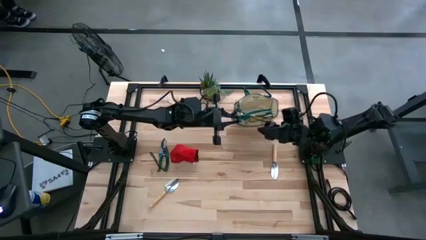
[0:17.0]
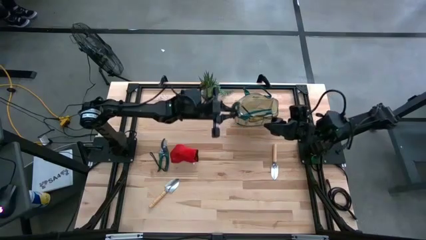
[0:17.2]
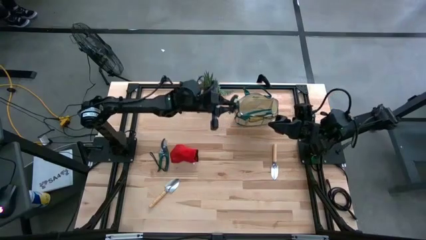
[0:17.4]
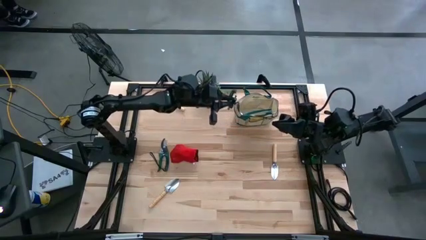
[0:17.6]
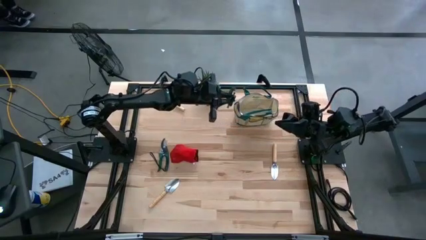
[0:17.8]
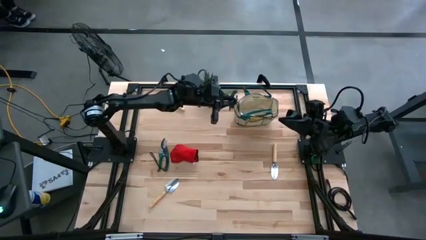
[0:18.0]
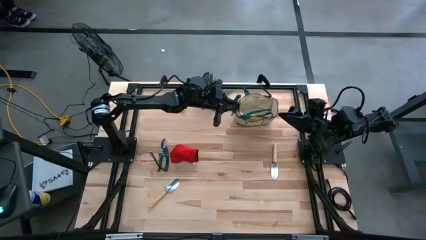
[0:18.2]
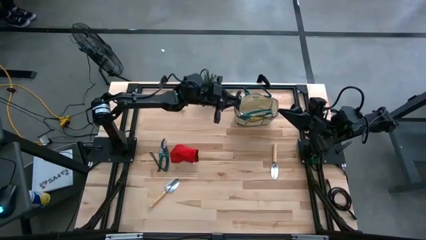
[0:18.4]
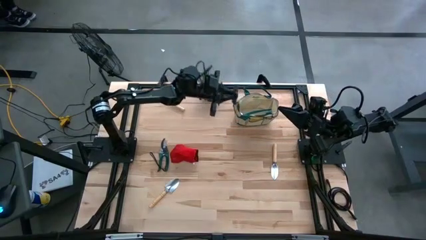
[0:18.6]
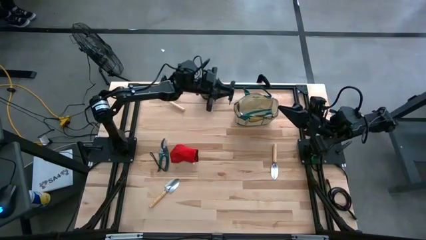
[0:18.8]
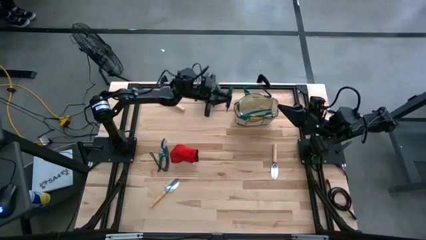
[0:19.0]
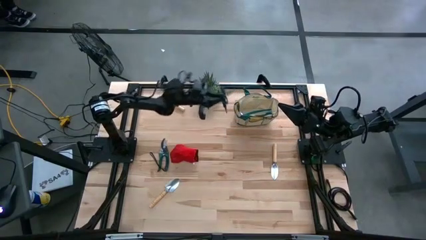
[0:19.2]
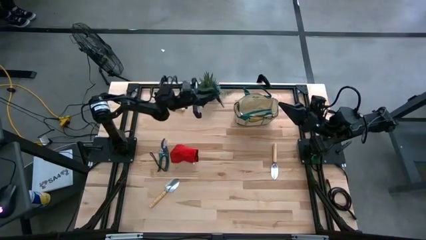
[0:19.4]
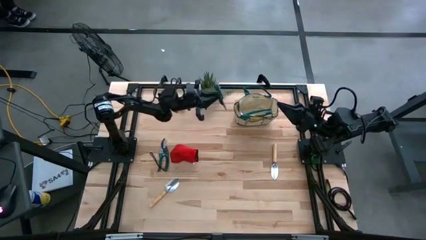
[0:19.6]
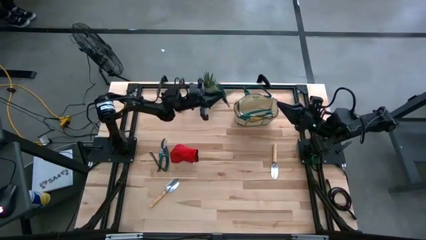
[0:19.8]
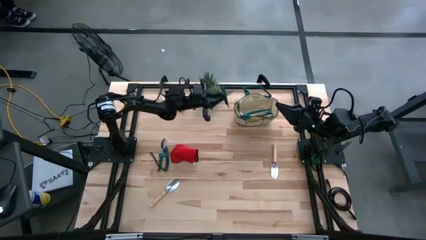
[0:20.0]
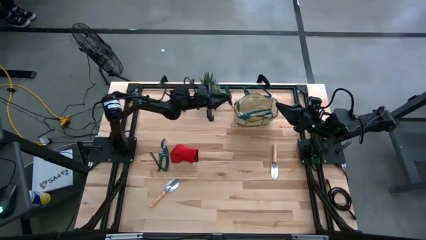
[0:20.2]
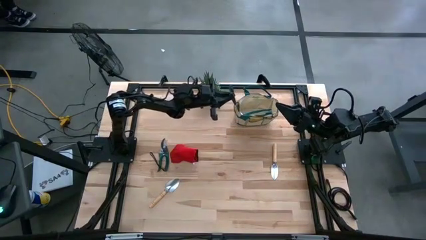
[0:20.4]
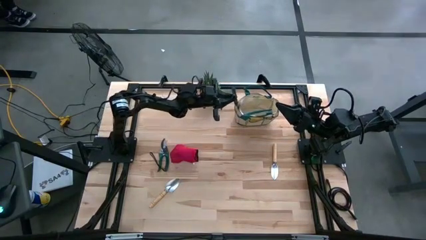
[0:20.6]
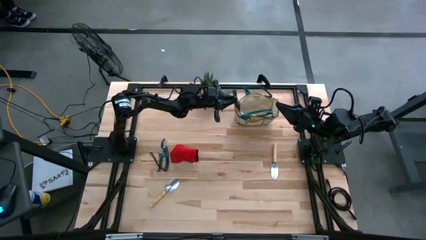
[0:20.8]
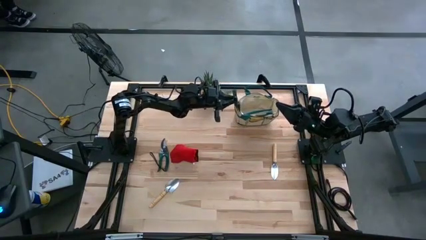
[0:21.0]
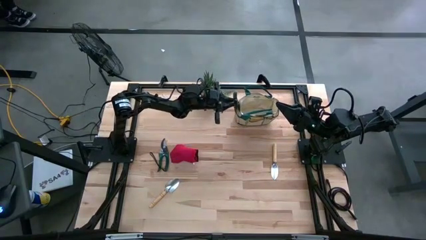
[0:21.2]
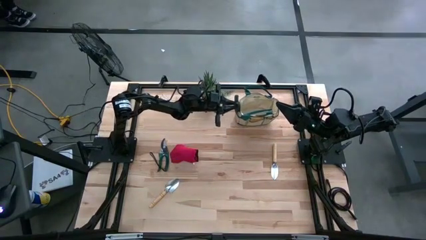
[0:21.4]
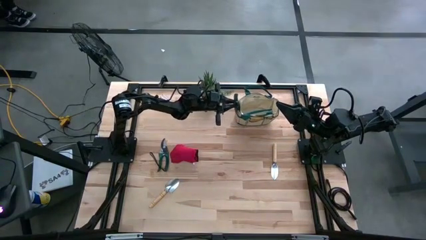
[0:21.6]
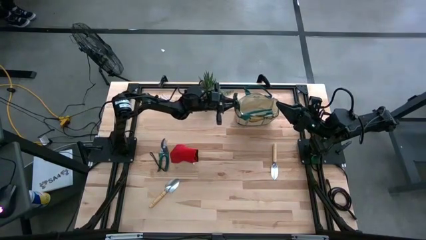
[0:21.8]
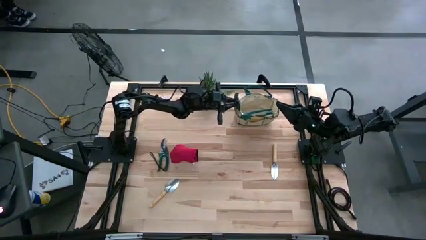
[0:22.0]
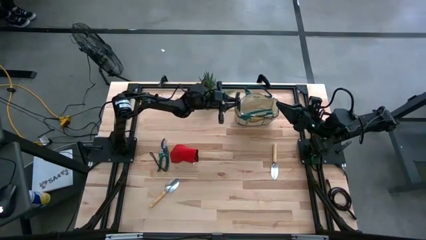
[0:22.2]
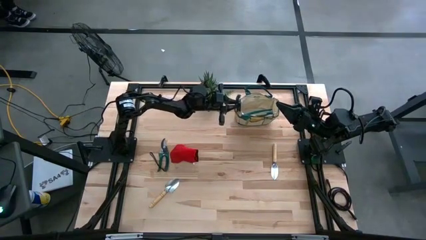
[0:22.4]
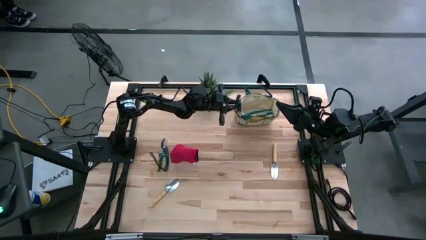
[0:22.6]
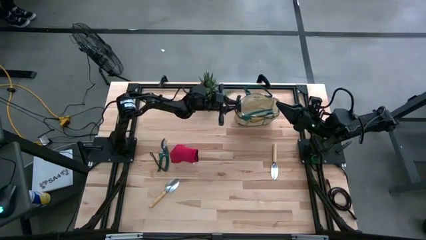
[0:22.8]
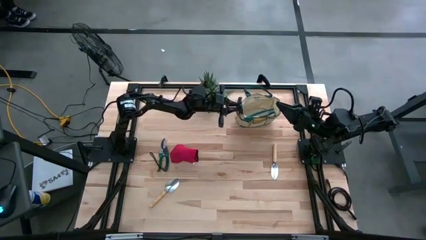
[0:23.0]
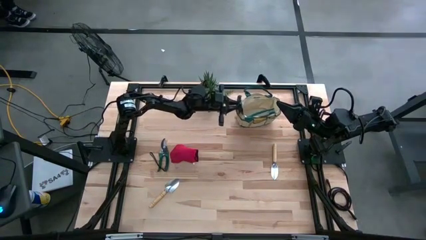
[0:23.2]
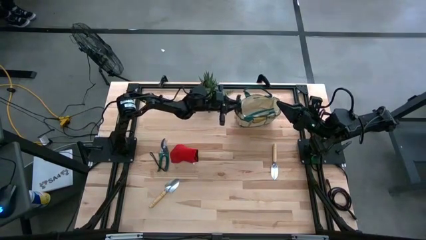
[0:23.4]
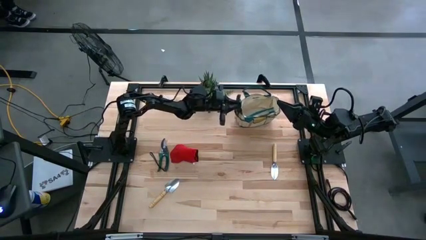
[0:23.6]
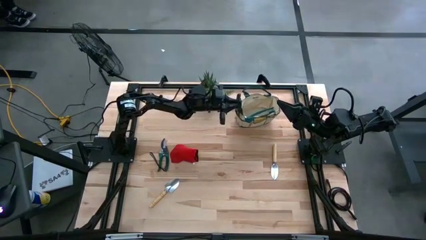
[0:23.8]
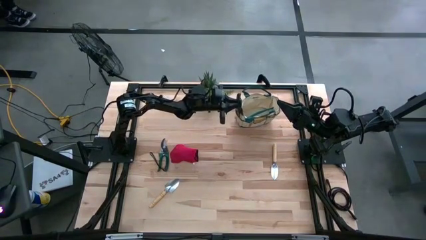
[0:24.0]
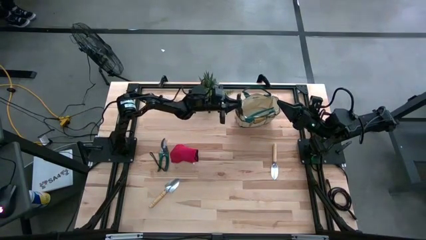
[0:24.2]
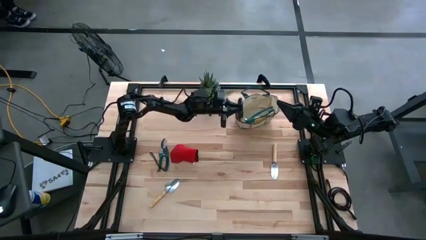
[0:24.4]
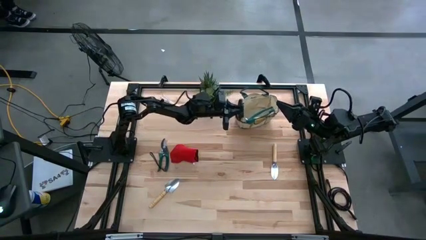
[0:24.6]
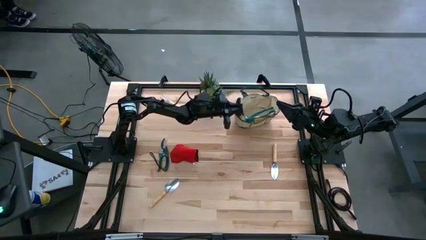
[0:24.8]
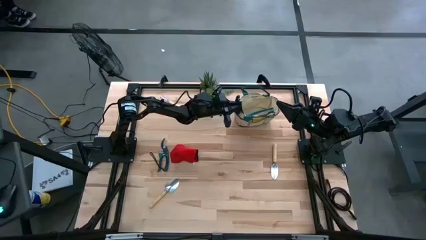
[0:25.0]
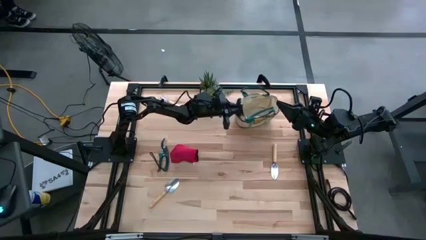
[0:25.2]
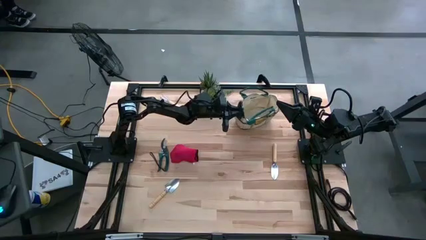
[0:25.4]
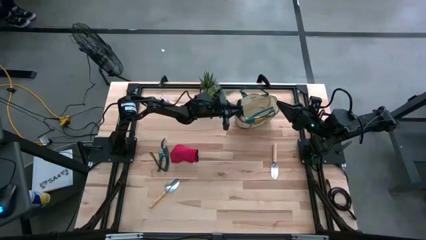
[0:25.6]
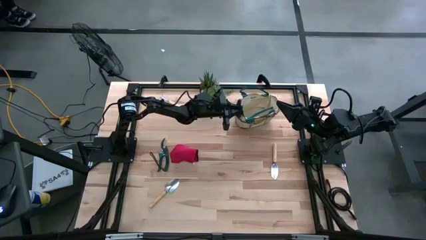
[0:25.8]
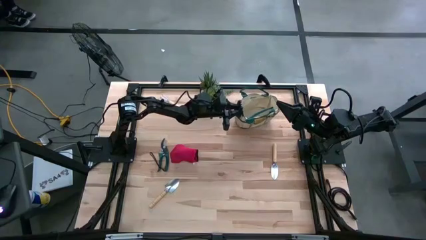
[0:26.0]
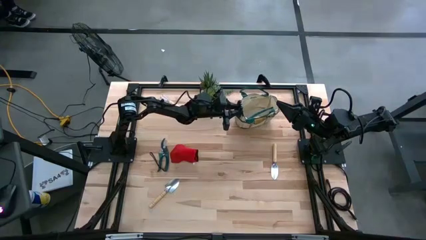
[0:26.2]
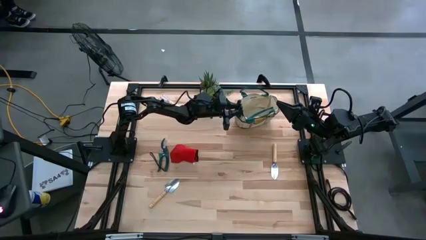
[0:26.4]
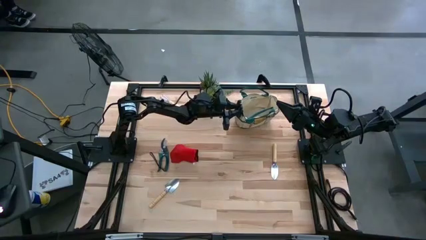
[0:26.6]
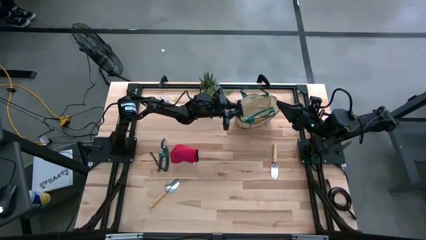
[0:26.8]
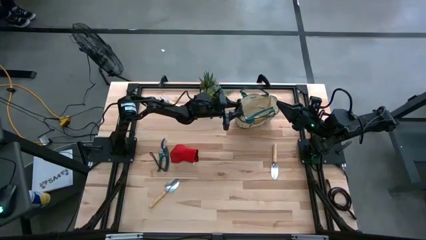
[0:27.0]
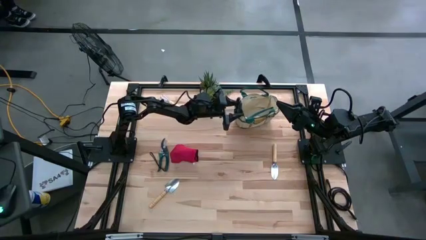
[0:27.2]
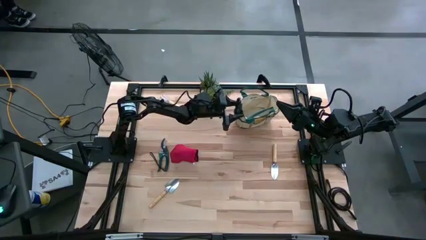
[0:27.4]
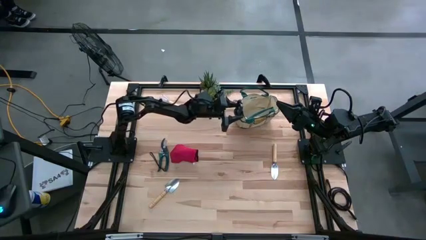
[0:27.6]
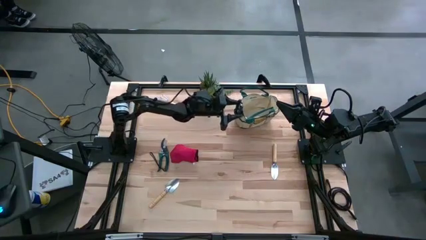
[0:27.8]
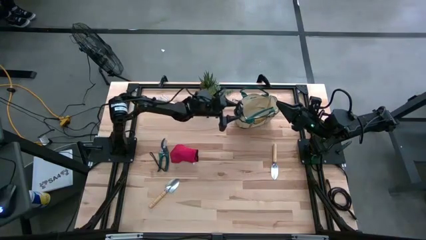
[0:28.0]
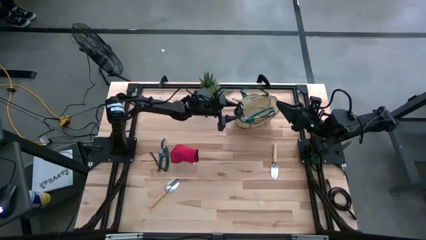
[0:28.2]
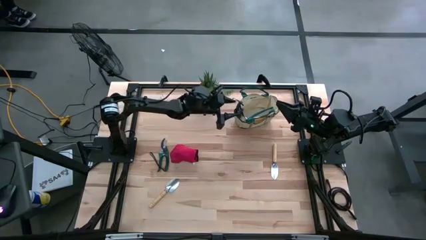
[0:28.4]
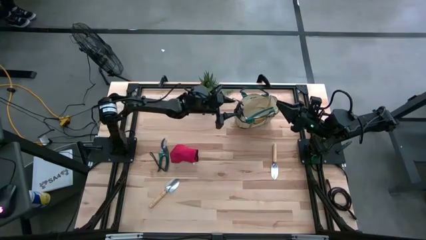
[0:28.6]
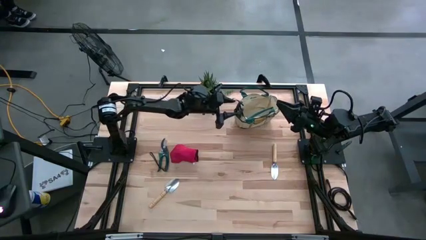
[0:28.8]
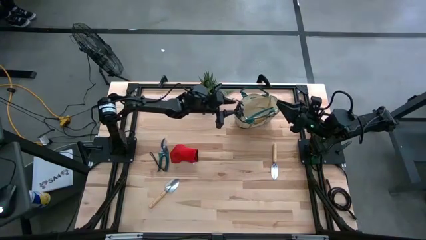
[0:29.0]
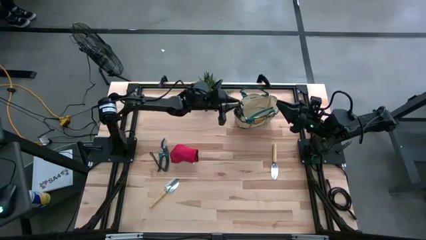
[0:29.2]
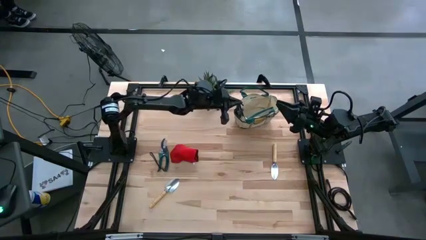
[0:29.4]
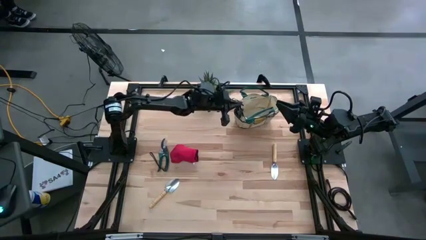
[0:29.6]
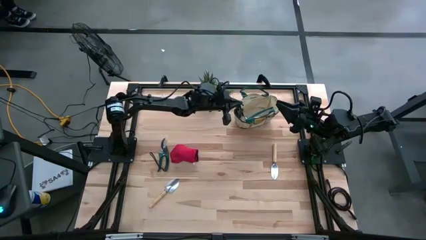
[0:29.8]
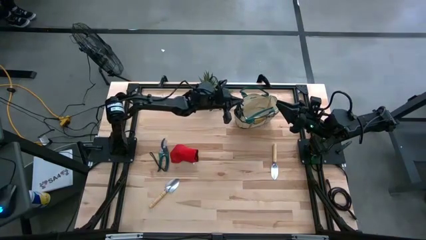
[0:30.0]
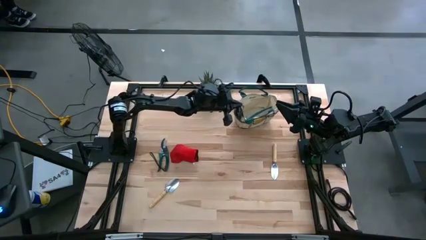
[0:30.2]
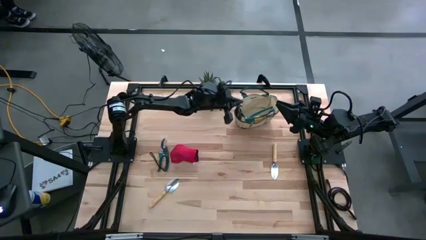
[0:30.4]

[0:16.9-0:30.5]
Task: Pick & Place Garden tools in Gardening bag
Put the right green shear scissors into the light brown gardening bag
